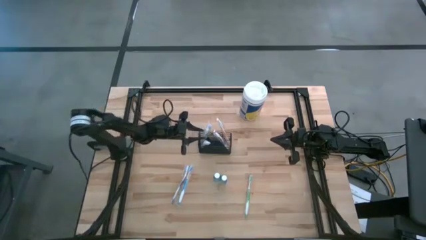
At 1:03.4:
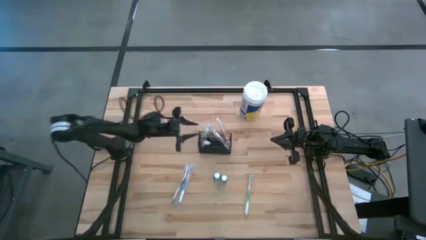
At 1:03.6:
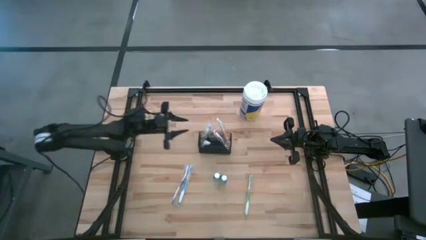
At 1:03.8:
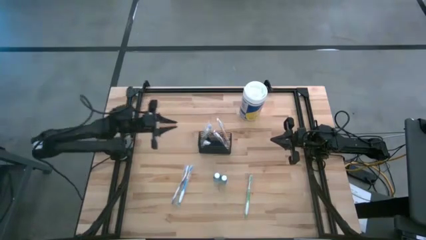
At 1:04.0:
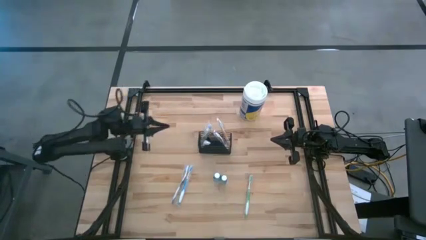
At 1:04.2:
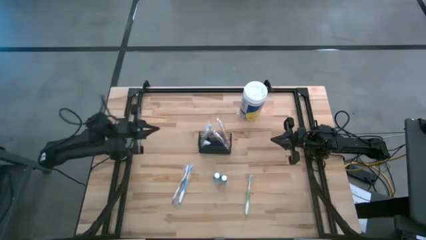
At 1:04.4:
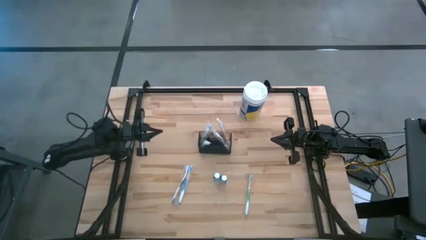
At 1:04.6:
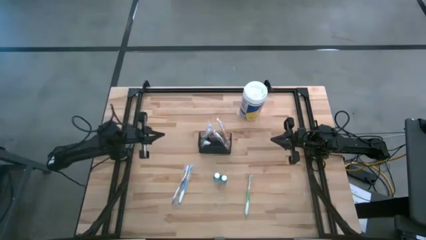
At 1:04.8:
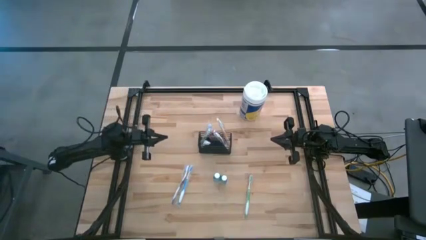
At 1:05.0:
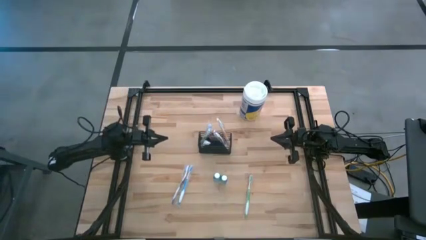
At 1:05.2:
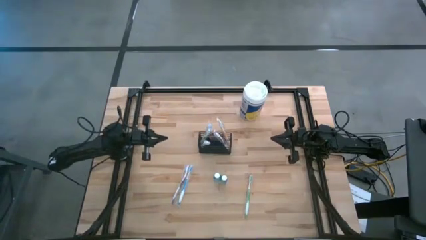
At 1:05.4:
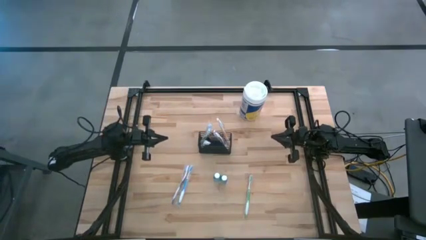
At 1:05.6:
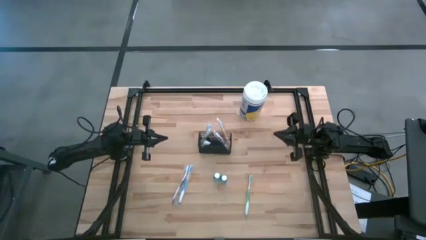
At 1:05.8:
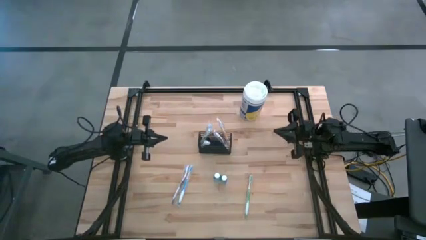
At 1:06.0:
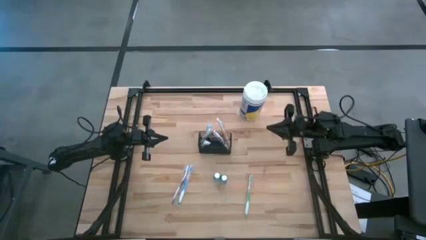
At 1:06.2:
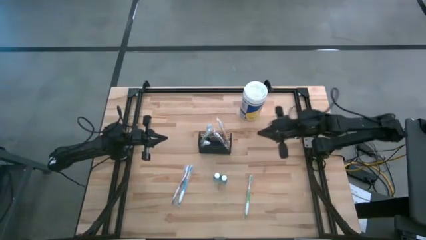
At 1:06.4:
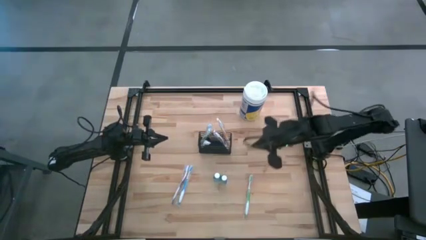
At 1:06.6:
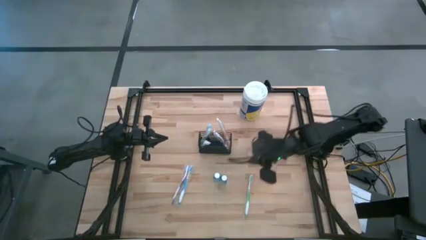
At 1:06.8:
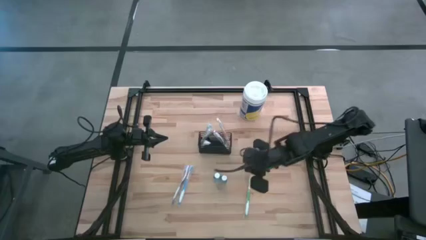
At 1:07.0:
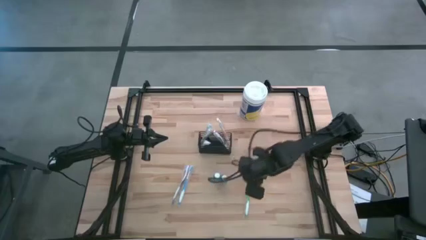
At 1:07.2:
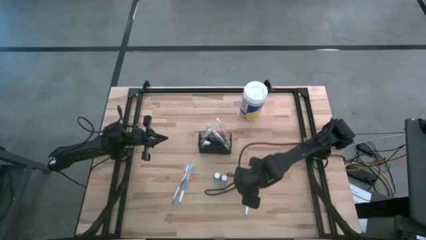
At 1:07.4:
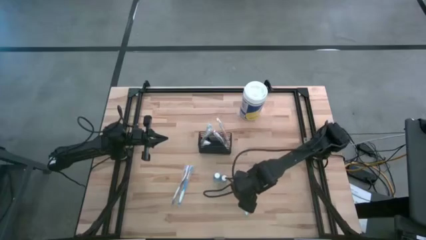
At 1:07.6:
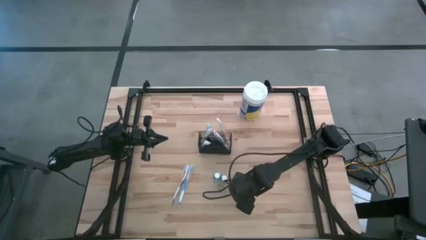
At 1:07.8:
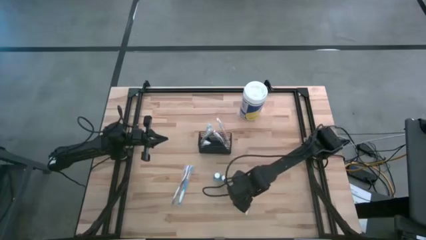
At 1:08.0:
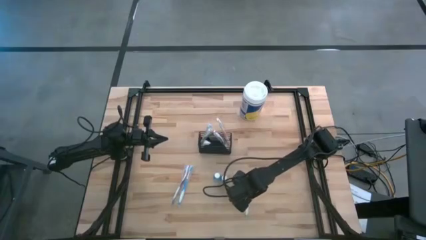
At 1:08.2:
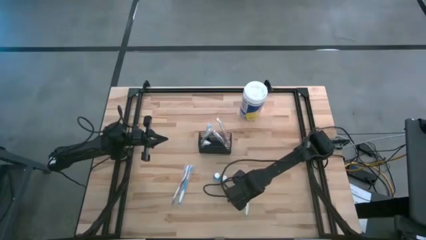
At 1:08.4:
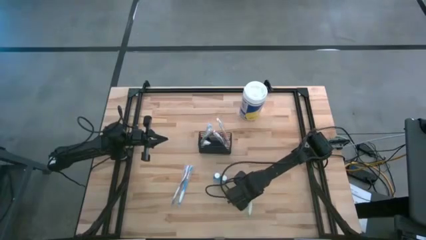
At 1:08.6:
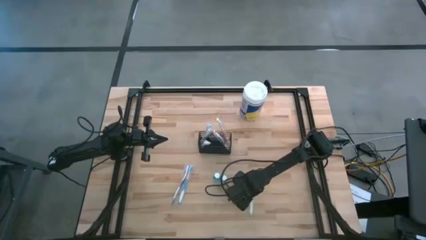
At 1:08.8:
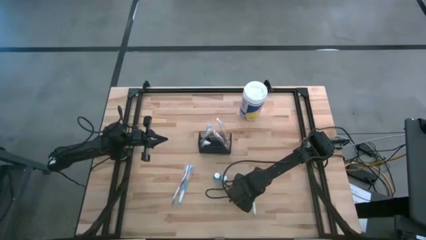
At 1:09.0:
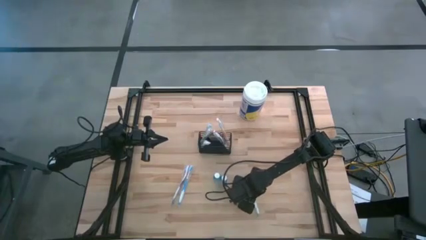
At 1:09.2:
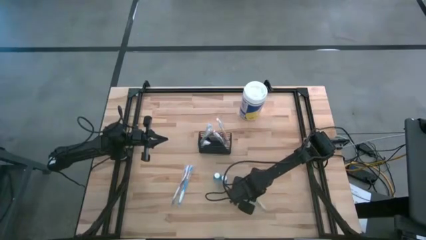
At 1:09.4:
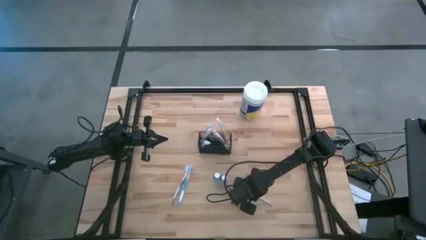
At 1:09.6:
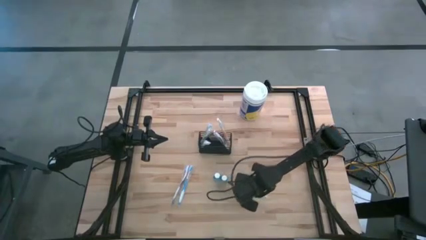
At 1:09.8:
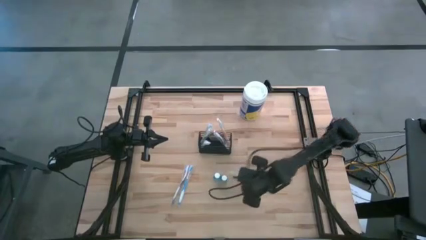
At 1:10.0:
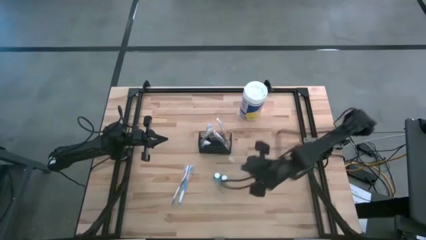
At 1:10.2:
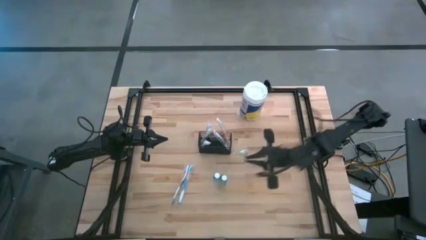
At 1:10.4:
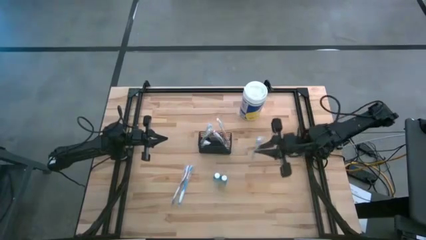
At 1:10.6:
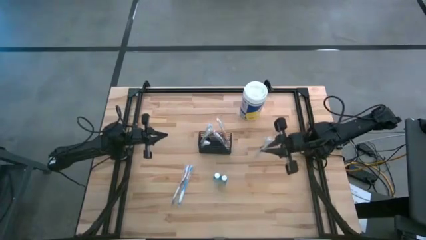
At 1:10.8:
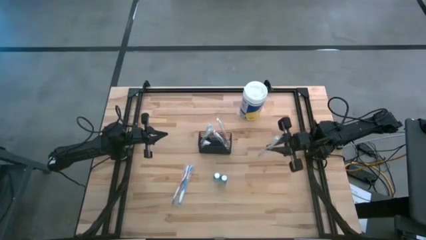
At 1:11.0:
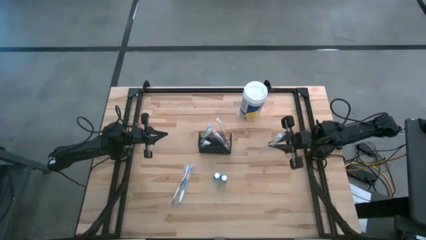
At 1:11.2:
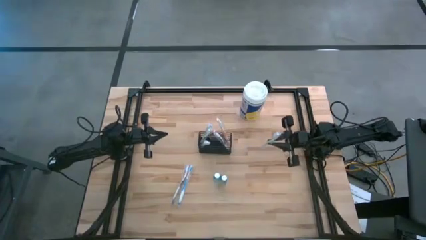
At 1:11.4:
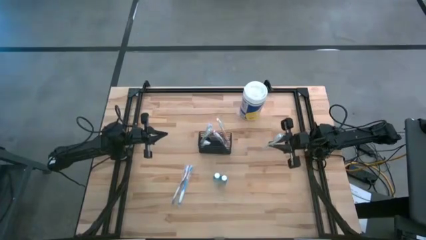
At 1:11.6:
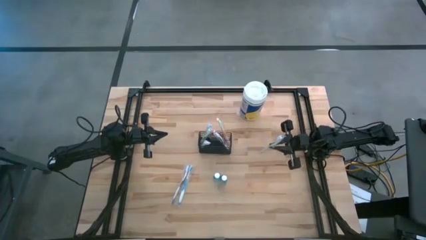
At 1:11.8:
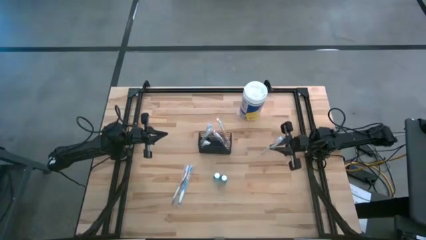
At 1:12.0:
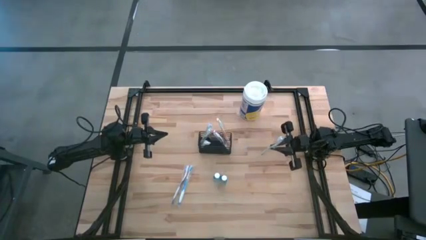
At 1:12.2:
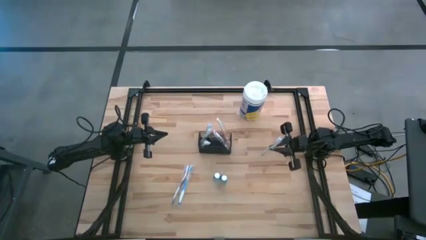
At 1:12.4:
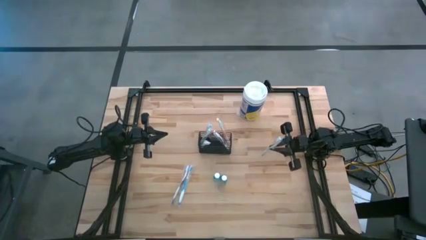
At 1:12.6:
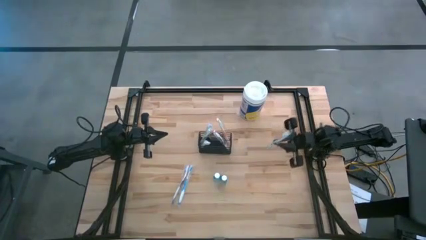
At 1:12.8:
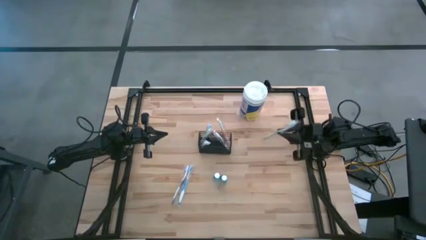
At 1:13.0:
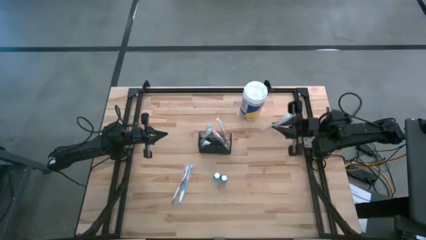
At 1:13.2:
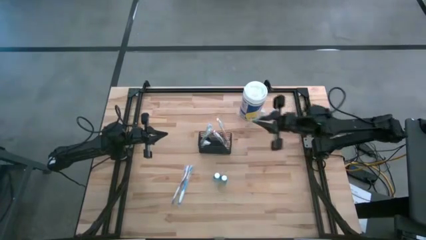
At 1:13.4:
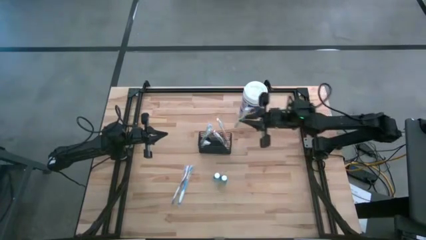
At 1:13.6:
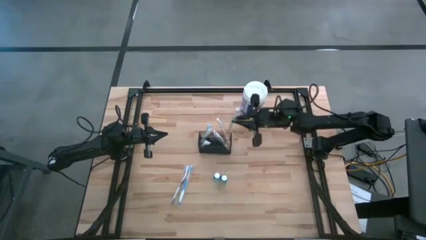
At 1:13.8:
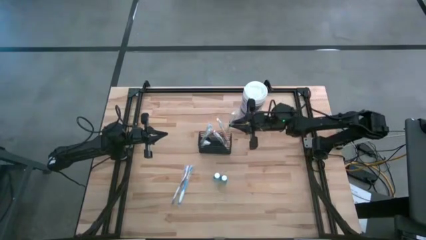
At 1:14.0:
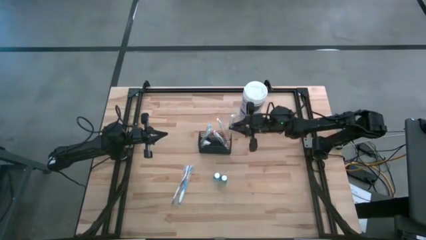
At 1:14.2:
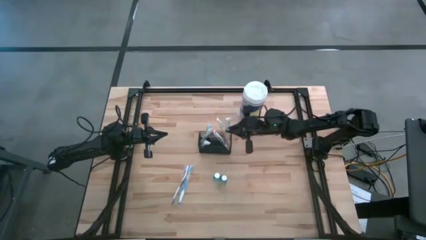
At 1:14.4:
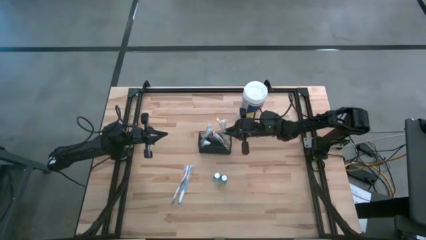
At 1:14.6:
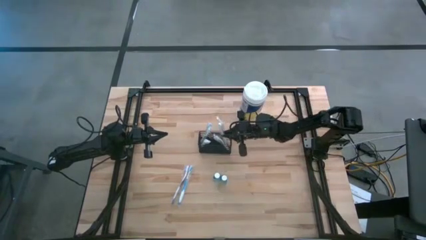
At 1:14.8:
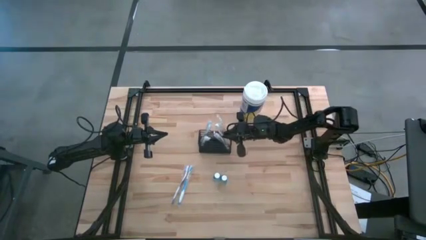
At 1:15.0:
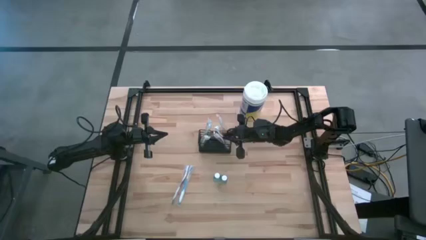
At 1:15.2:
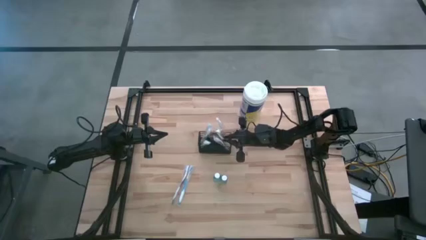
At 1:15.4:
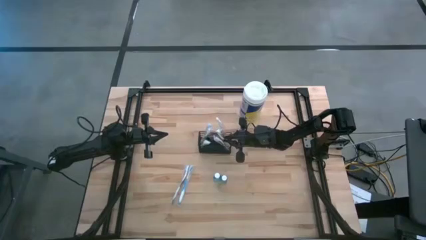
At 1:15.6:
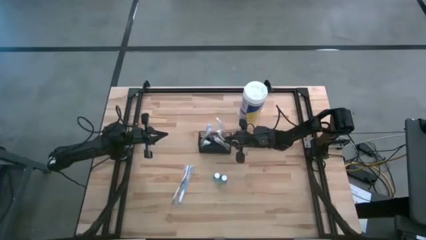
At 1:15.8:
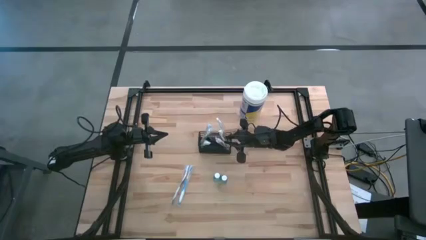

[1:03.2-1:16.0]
Task: Pick & Place toothbrushing station
Put the green toothbrush into the black wire organizer
